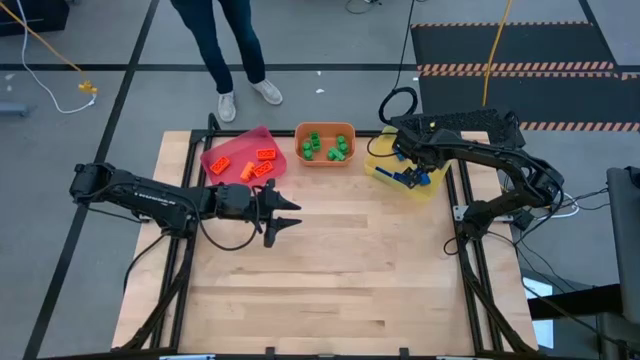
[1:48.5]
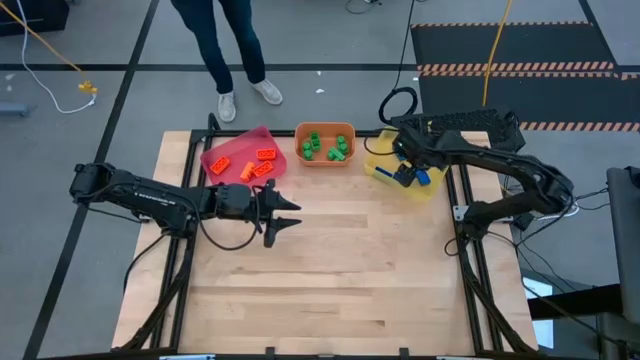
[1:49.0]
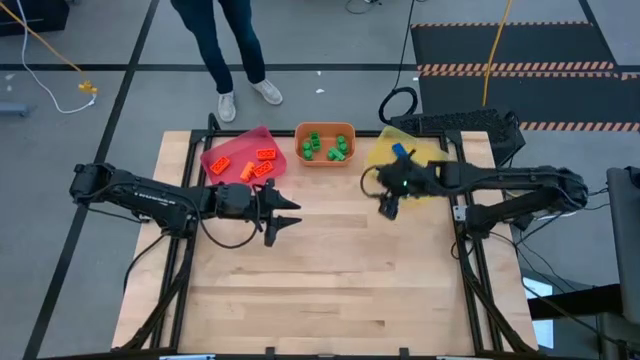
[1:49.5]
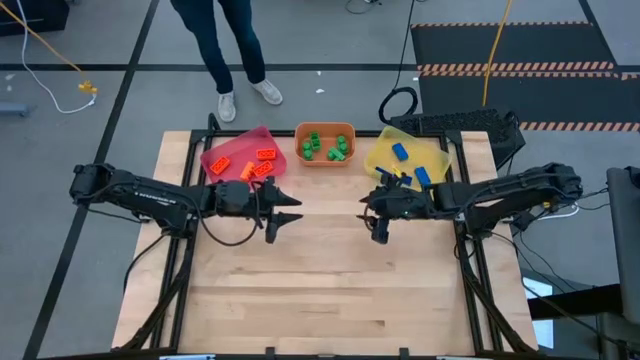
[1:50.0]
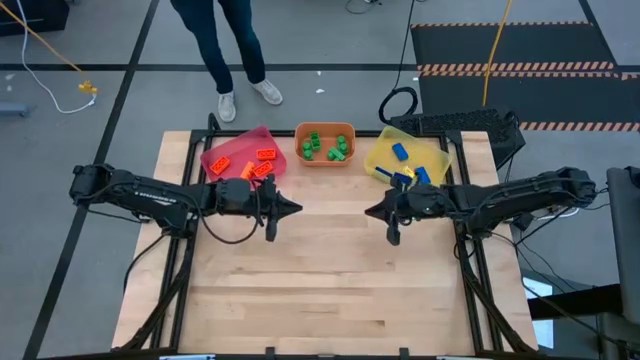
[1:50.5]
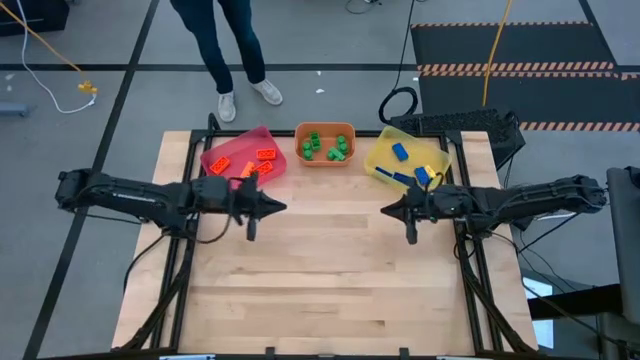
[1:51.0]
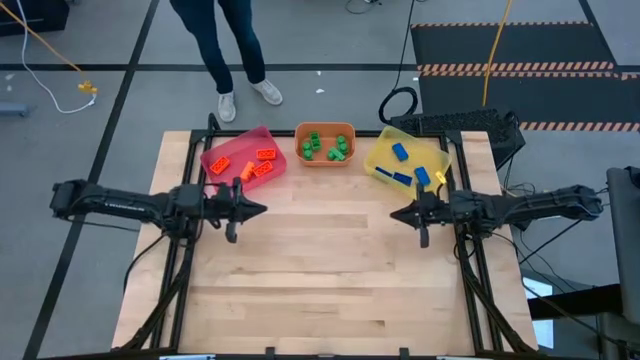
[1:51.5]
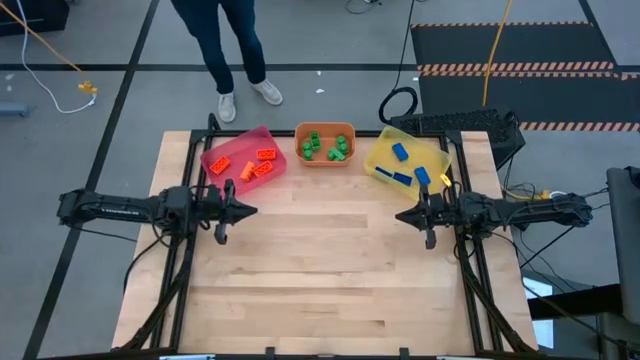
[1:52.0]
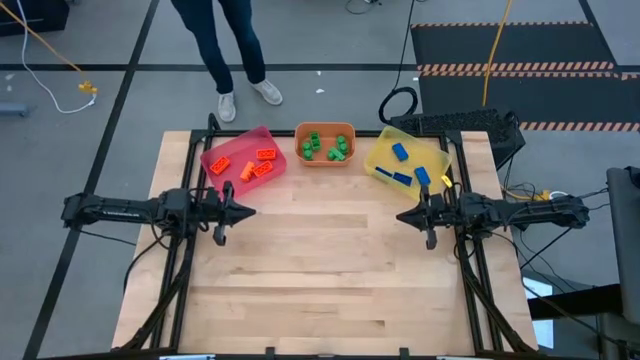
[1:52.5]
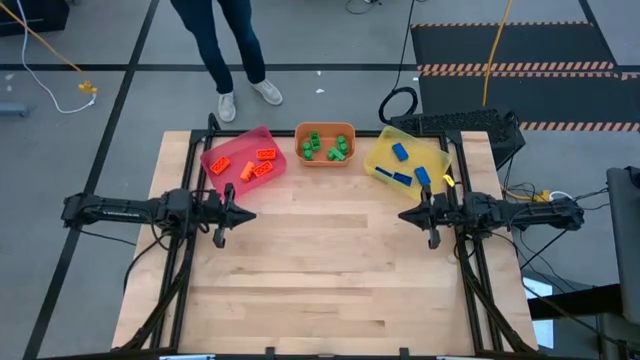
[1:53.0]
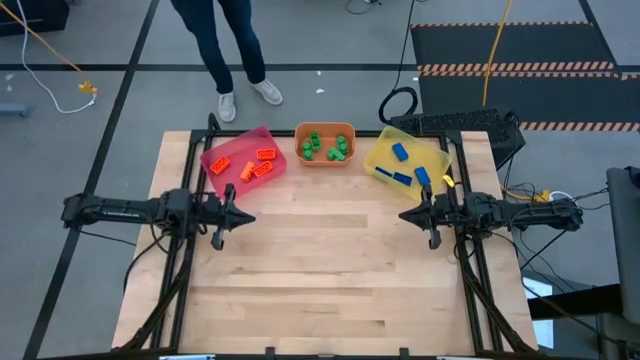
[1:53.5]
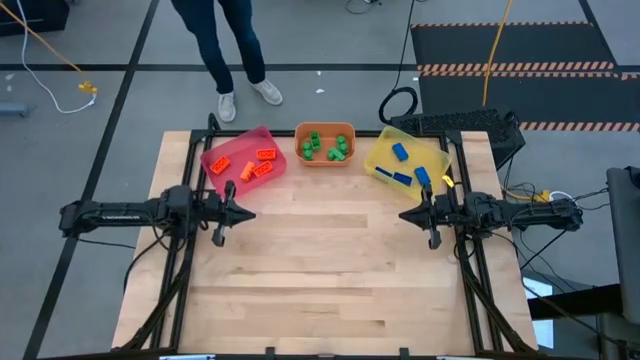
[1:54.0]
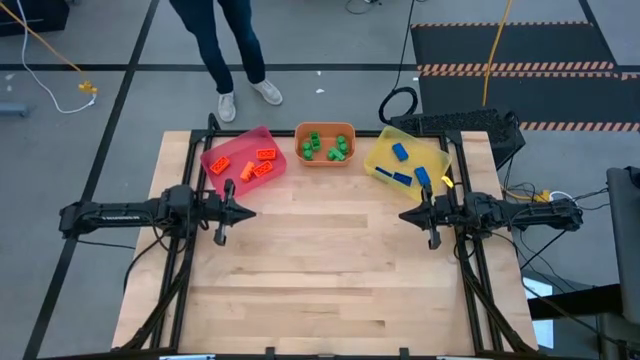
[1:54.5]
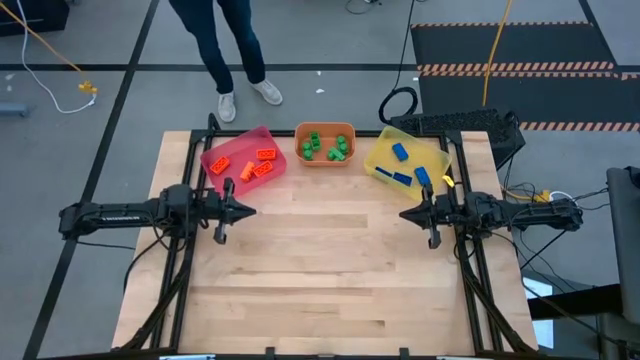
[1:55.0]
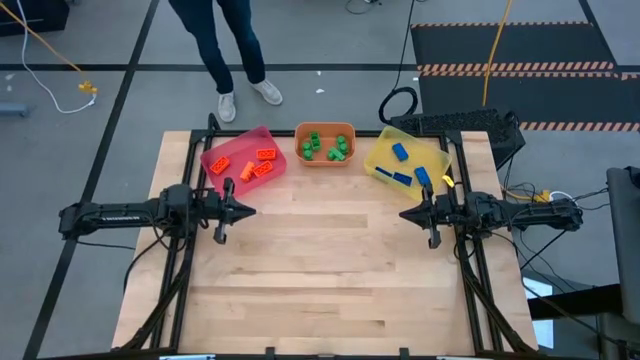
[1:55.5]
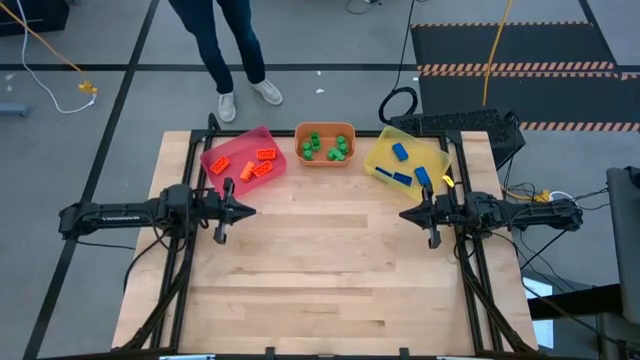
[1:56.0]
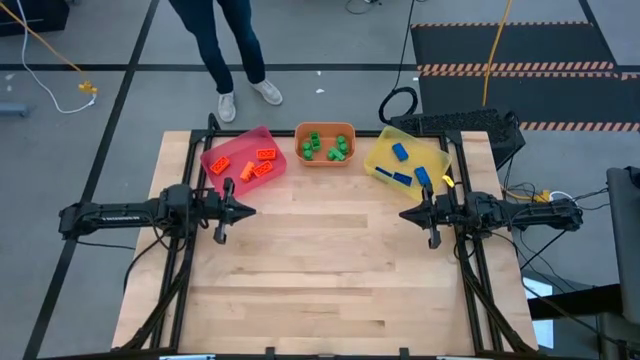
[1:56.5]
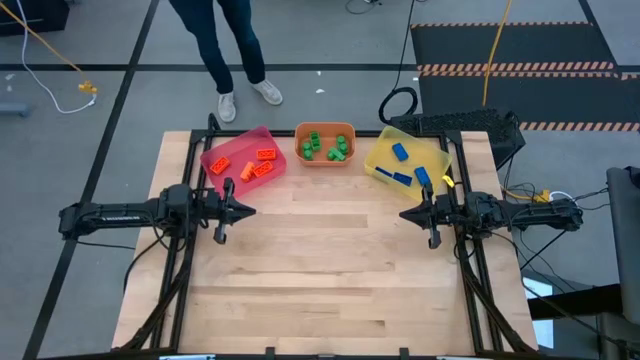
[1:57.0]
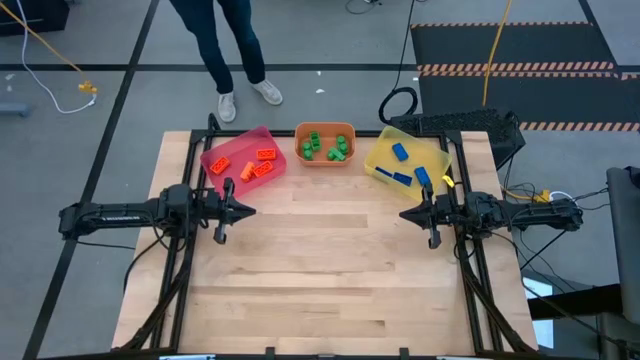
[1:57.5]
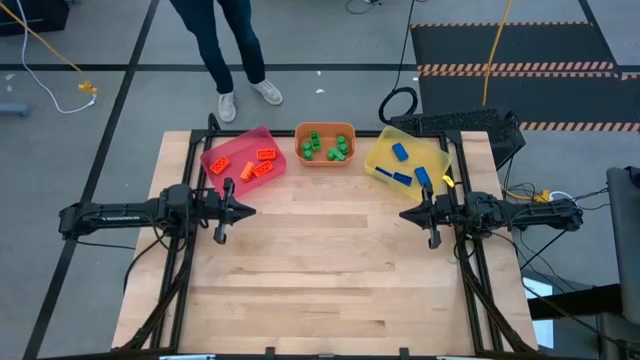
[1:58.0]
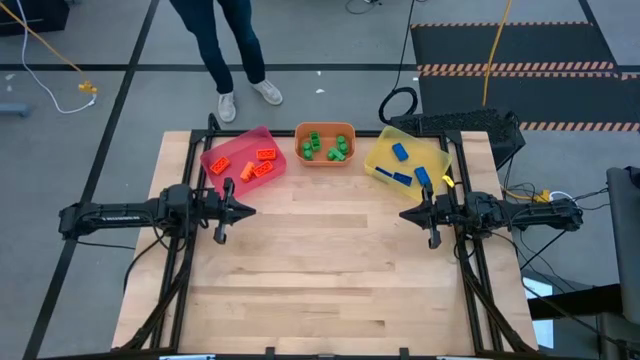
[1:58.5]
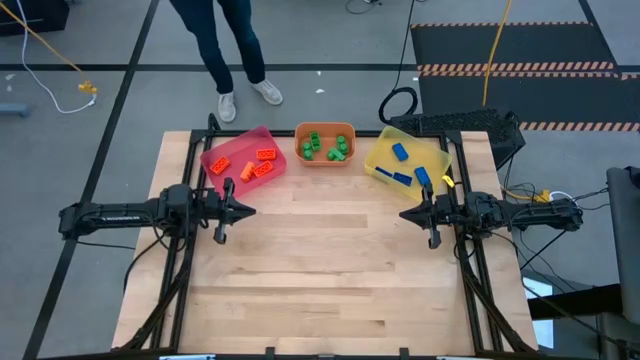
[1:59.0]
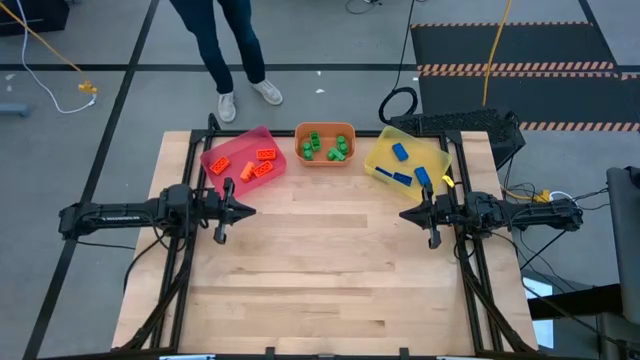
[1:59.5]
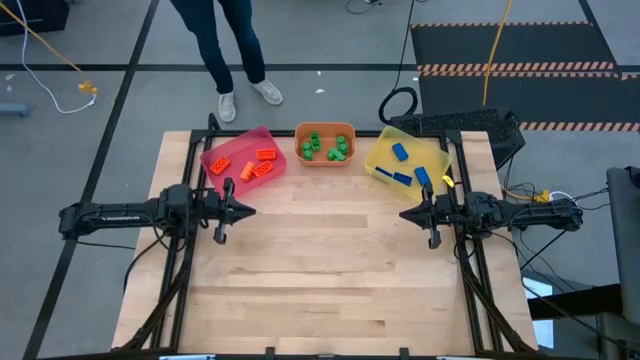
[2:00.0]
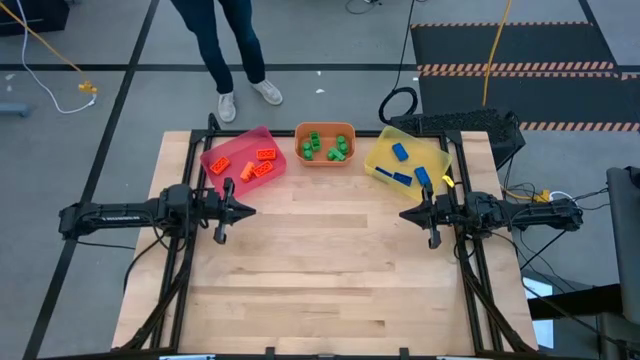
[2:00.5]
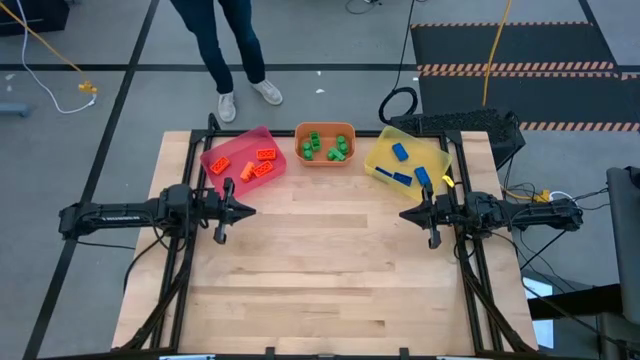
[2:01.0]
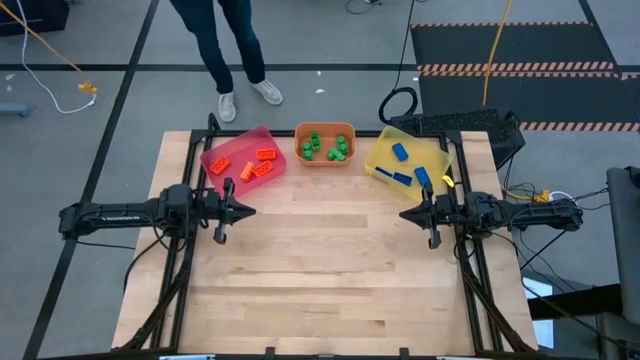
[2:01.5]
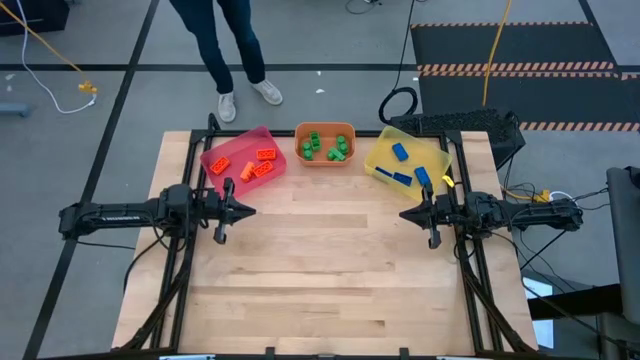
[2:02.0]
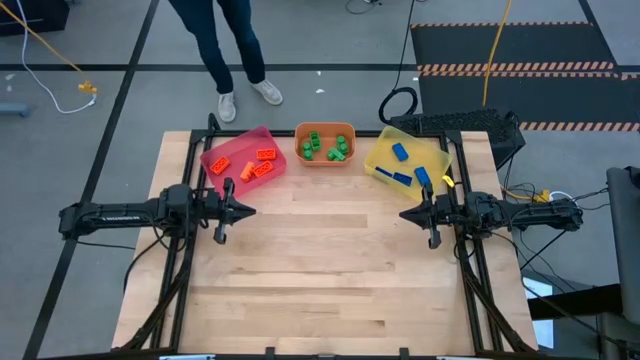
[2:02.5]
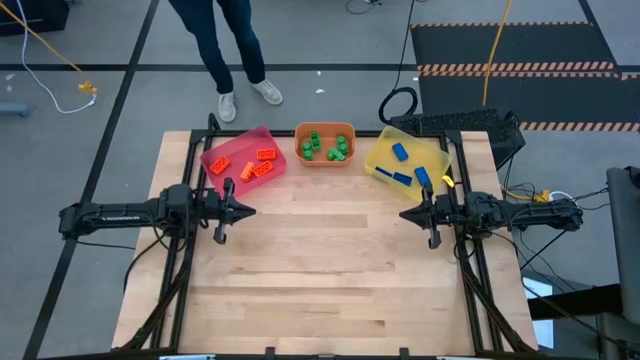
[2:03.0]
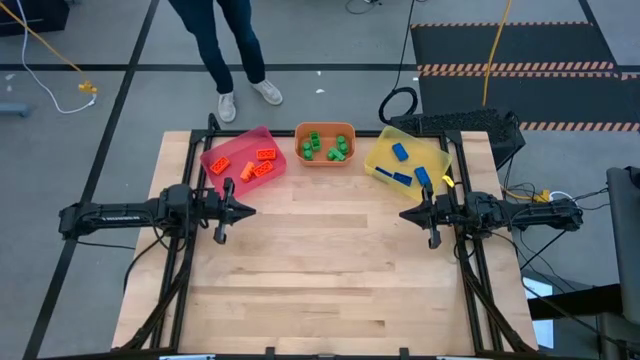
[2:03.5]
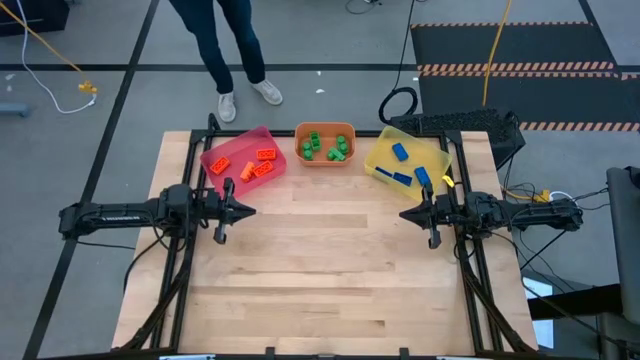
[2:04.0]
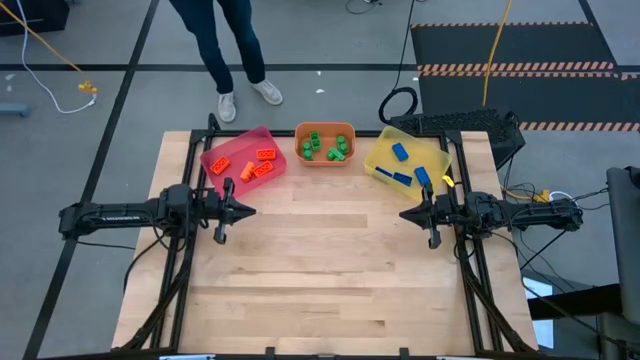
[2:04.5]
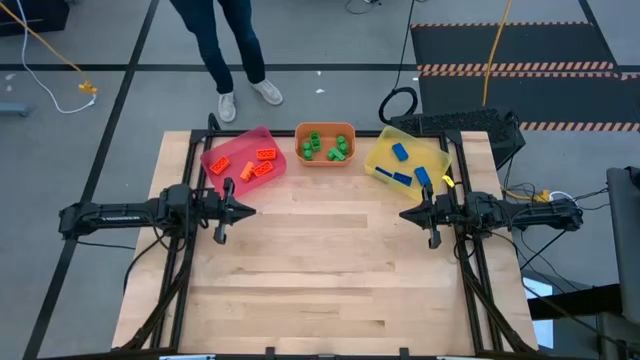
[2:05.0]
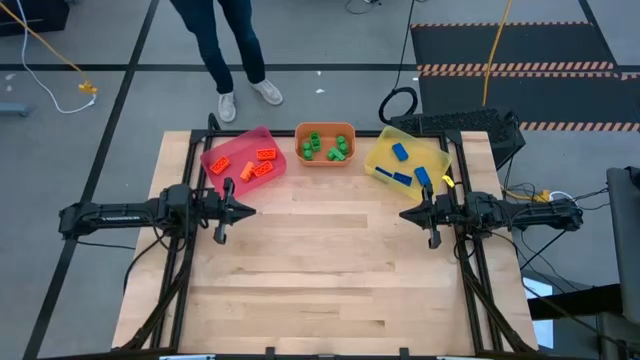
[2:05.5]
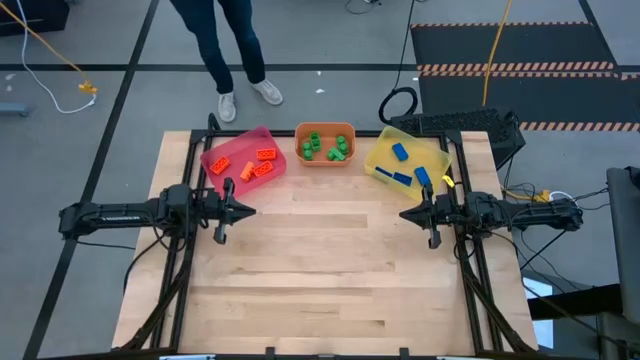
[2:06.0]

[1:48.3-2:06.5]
Task: Sort & place blocks by color
Return to Home Position

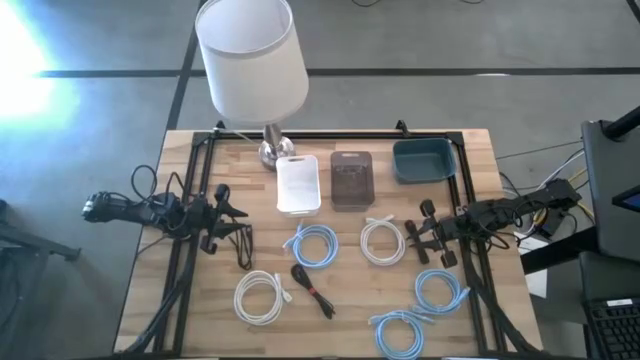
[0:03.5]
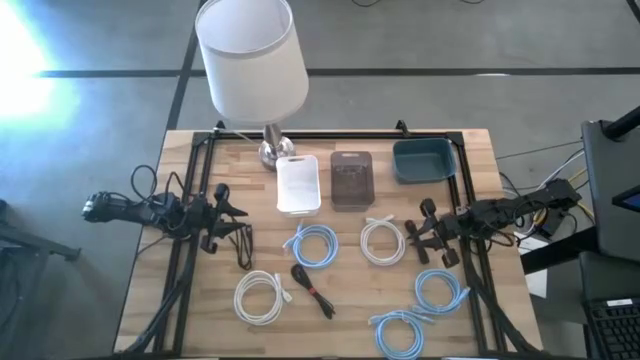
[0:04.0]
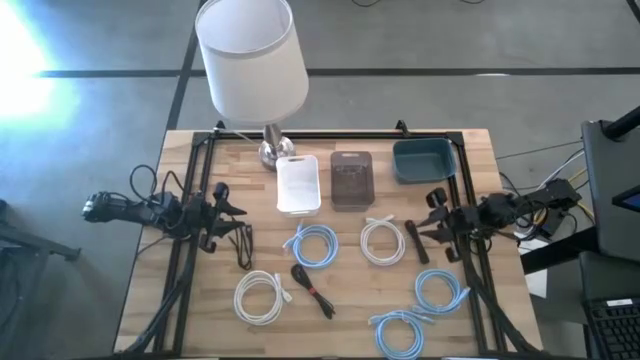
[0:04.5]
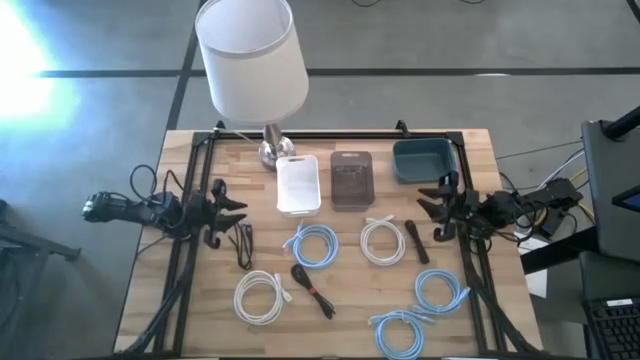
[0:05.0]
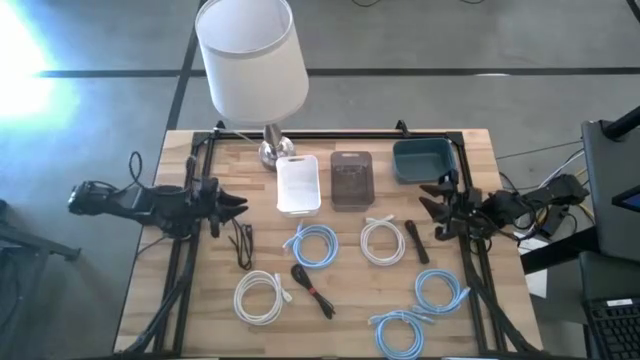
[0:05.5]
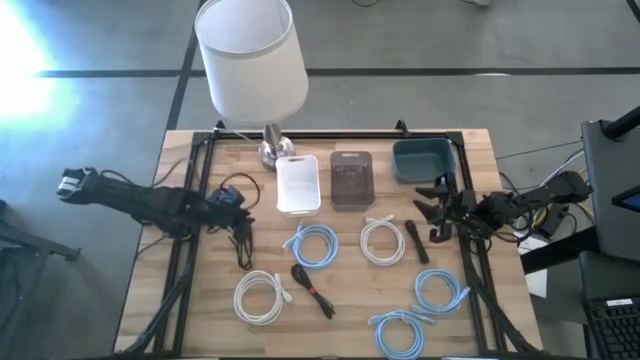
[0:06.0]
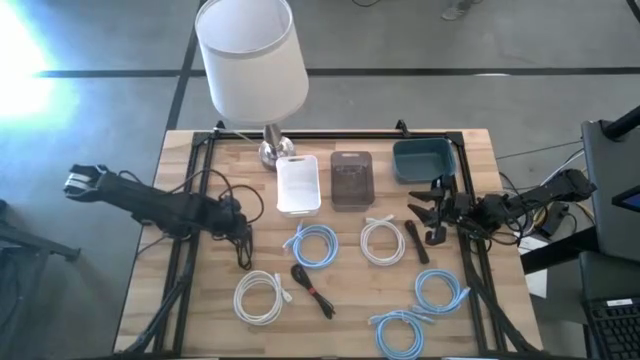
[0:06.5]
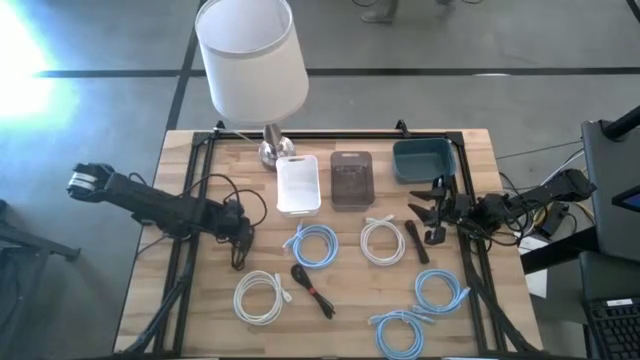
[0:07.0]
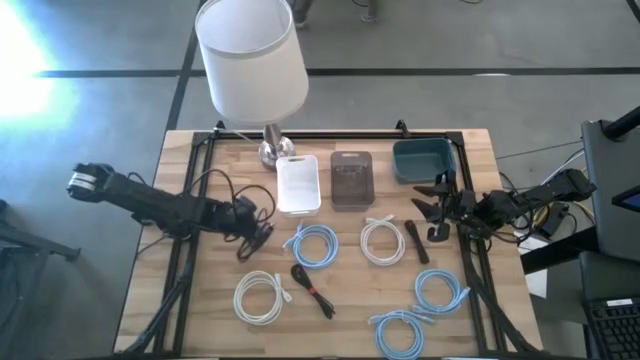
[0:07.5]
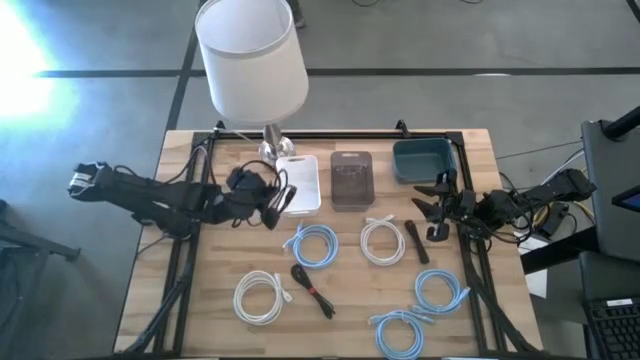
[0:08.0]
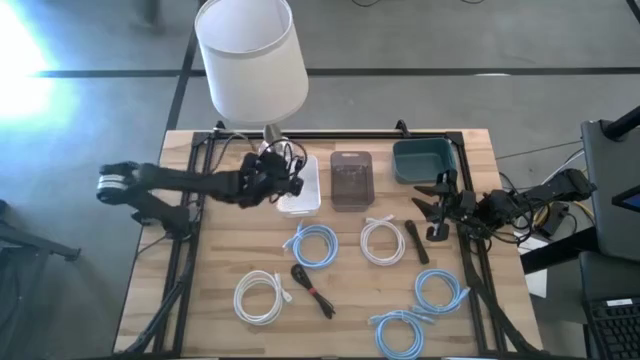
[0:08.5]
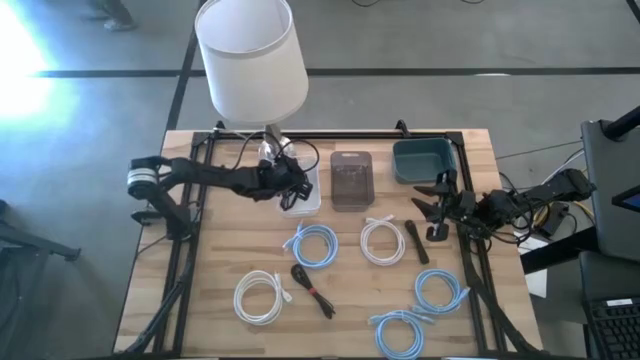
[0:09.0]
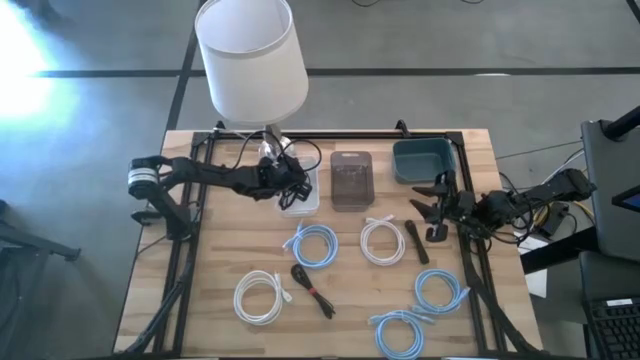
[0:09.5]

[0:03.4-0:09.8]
Task: Pick & Place USB Port
Put the top left black charger cable into the white bin
